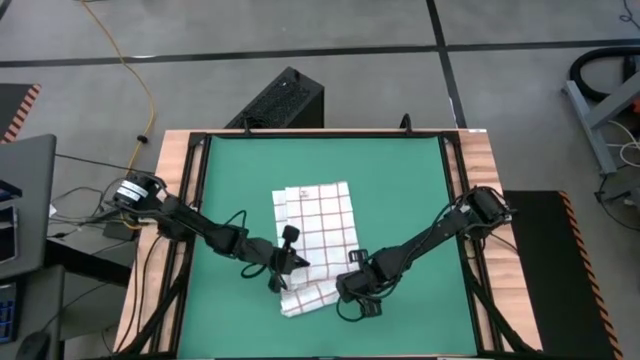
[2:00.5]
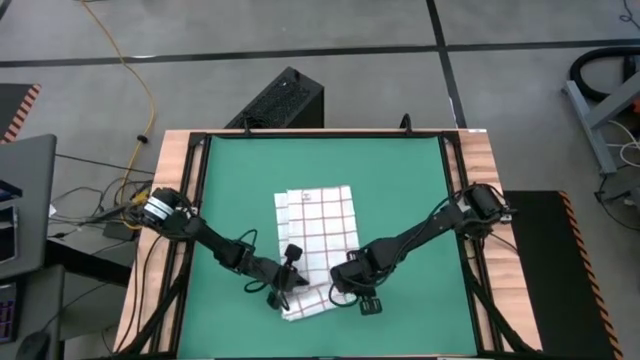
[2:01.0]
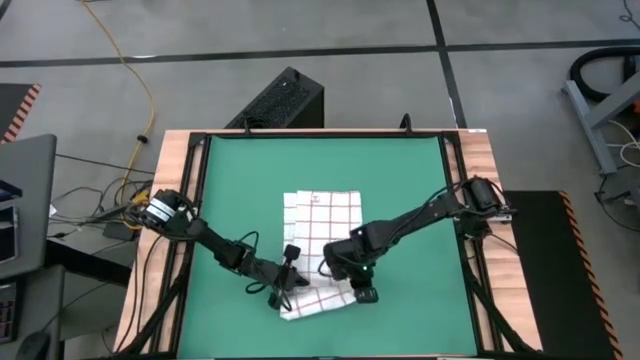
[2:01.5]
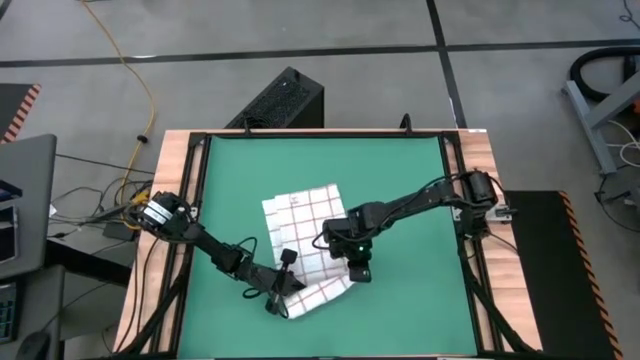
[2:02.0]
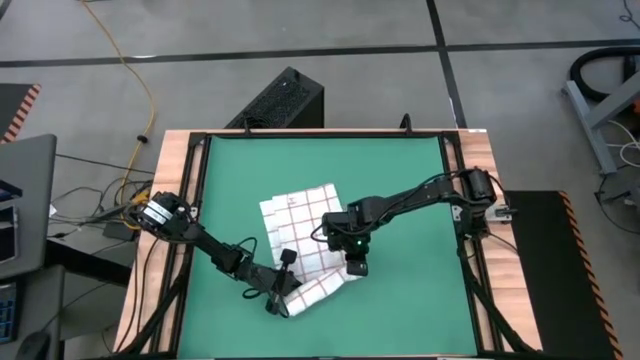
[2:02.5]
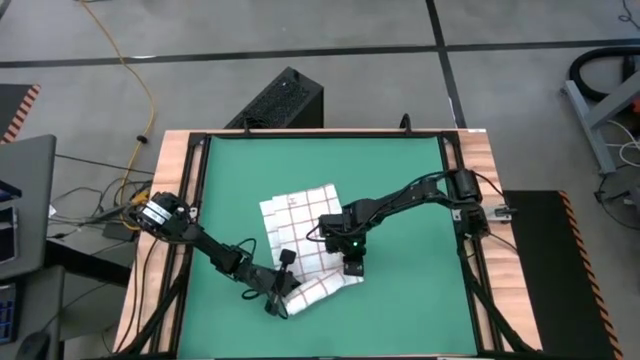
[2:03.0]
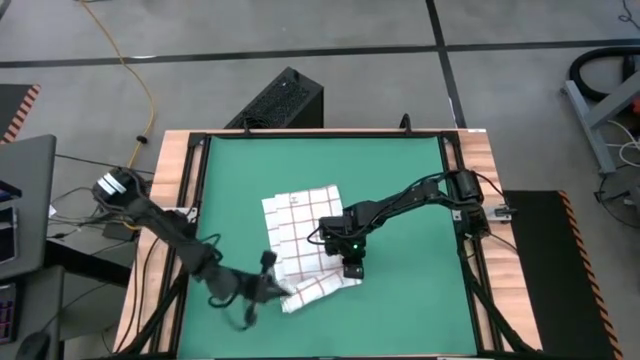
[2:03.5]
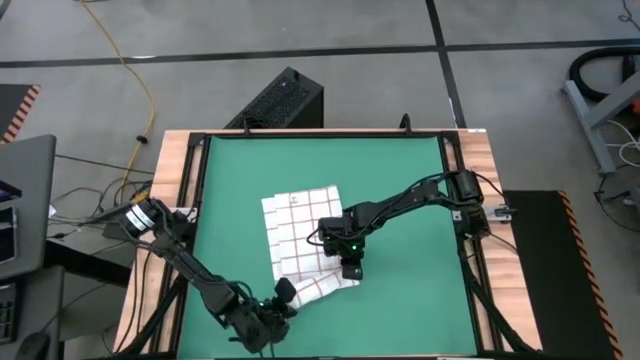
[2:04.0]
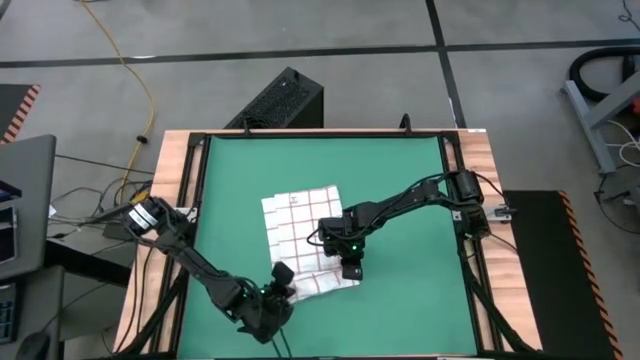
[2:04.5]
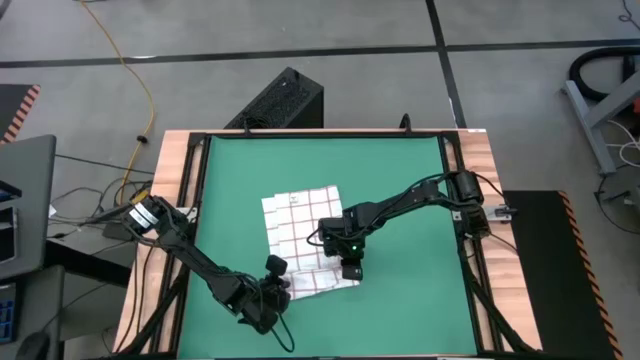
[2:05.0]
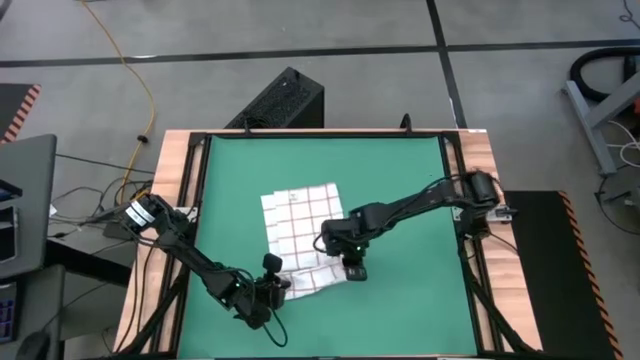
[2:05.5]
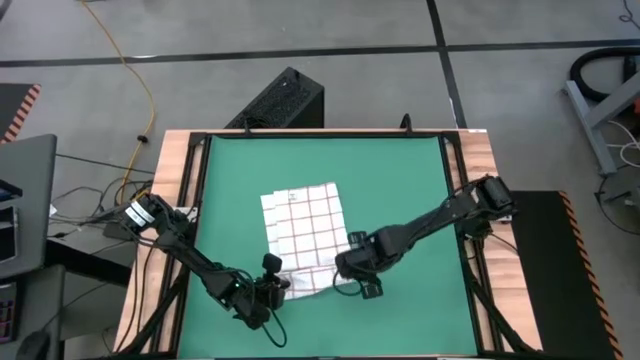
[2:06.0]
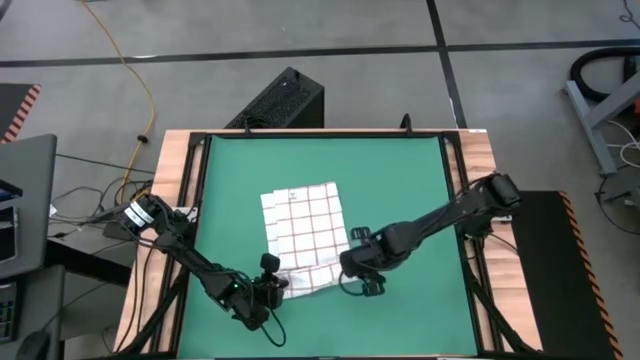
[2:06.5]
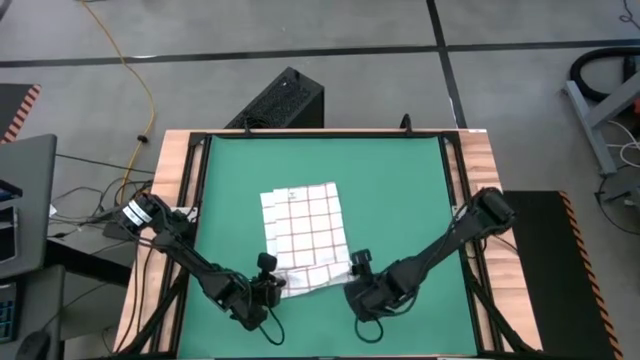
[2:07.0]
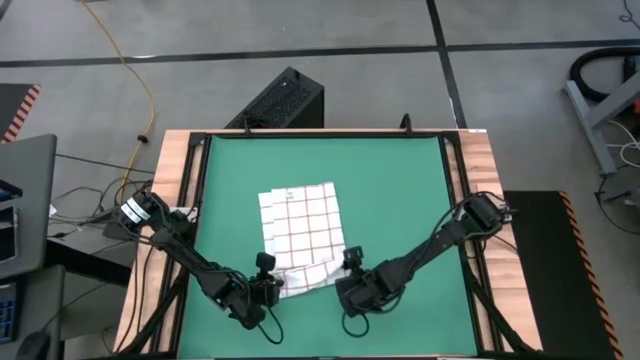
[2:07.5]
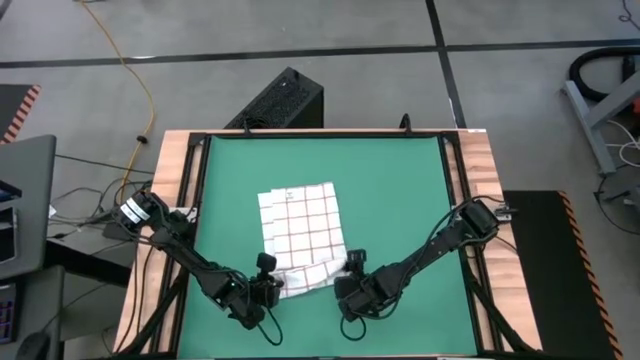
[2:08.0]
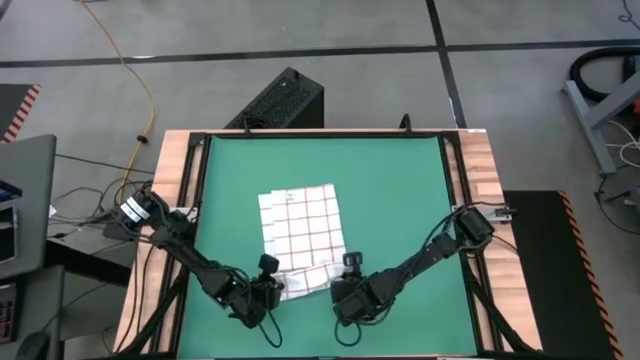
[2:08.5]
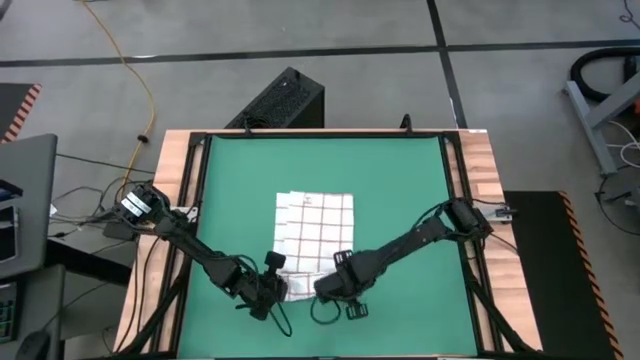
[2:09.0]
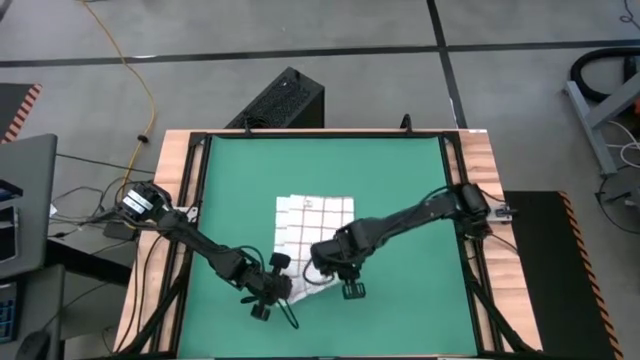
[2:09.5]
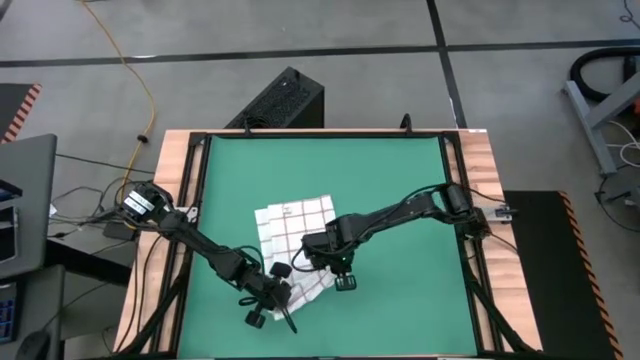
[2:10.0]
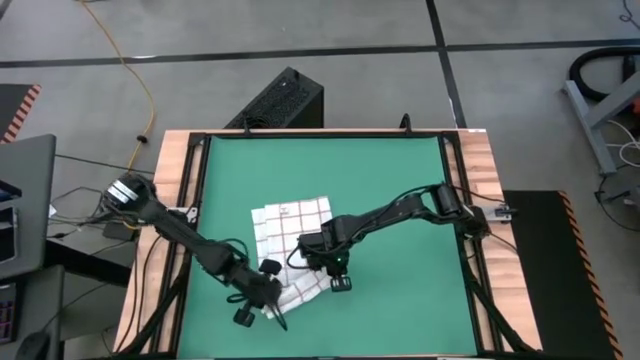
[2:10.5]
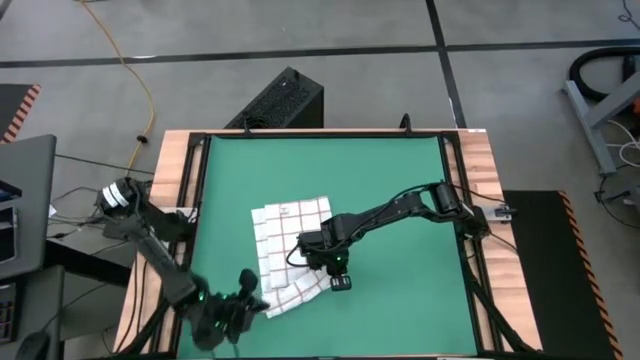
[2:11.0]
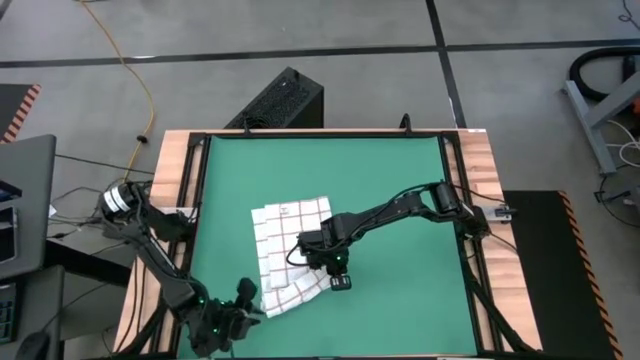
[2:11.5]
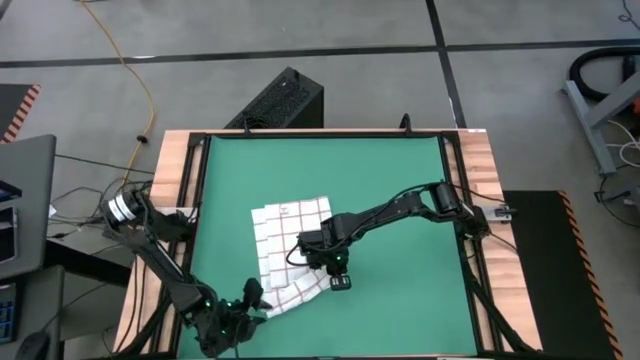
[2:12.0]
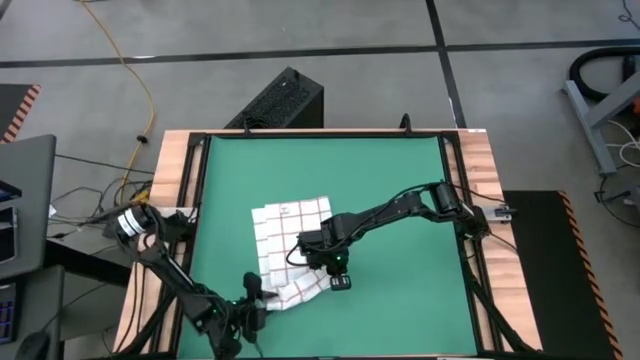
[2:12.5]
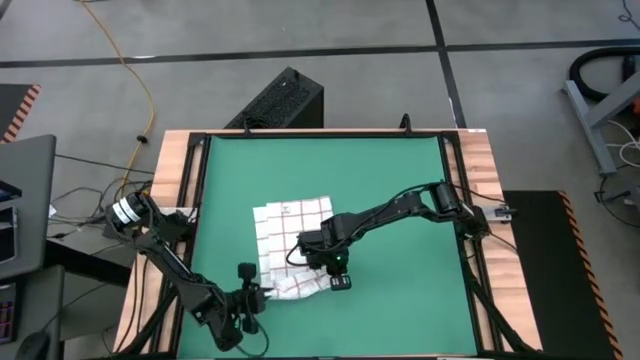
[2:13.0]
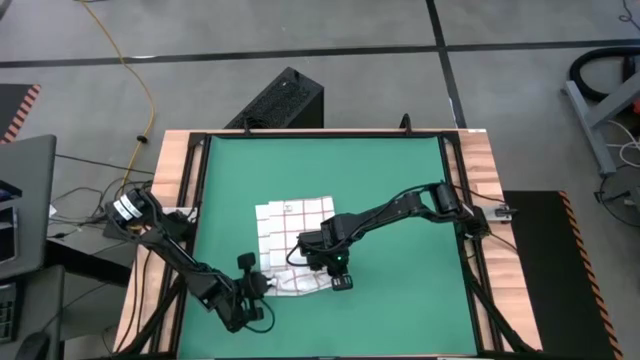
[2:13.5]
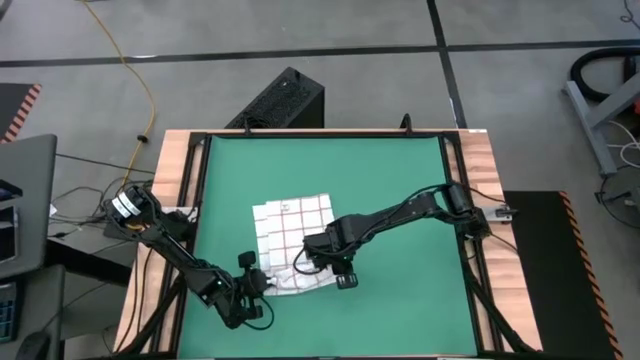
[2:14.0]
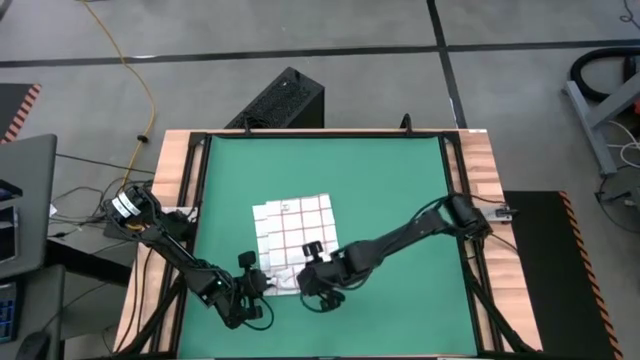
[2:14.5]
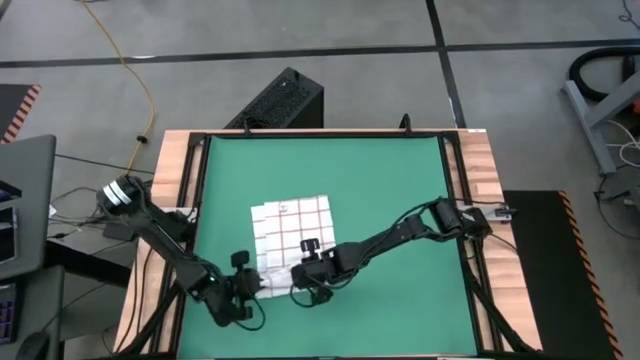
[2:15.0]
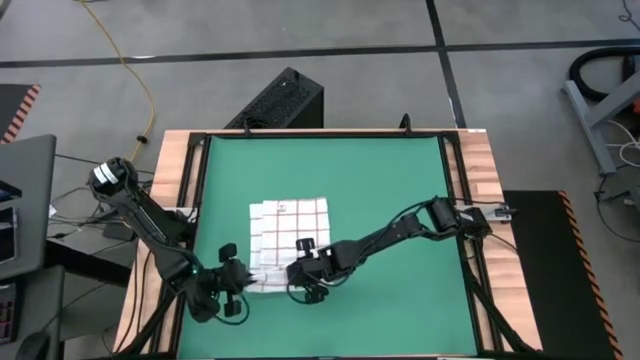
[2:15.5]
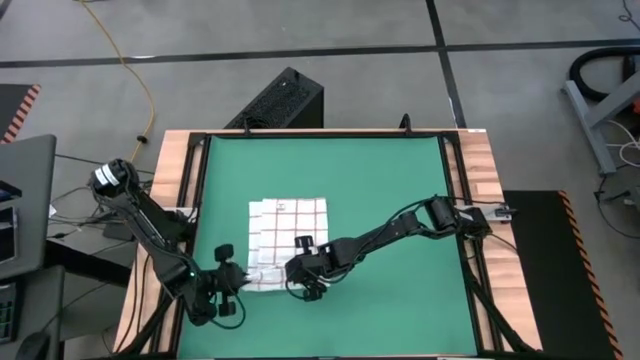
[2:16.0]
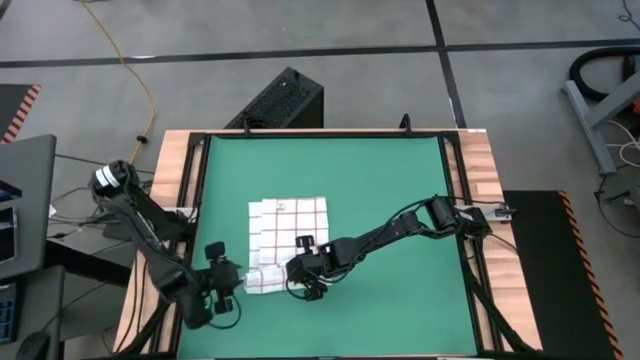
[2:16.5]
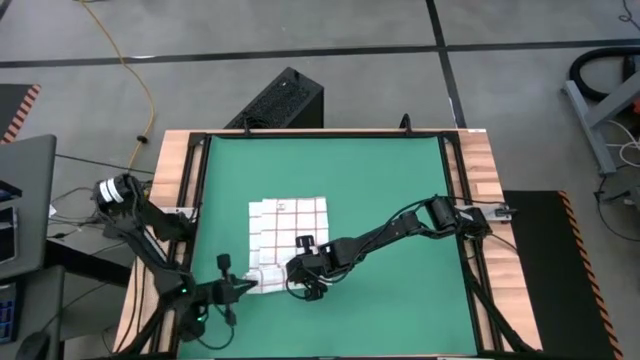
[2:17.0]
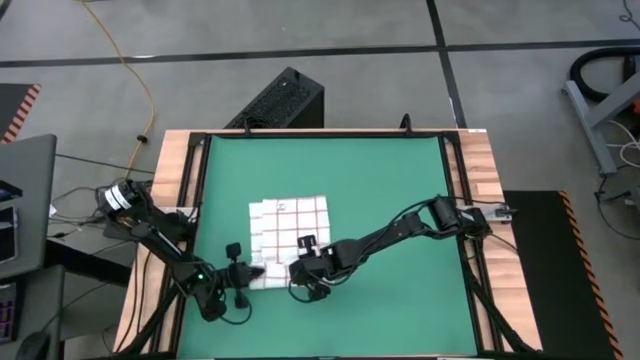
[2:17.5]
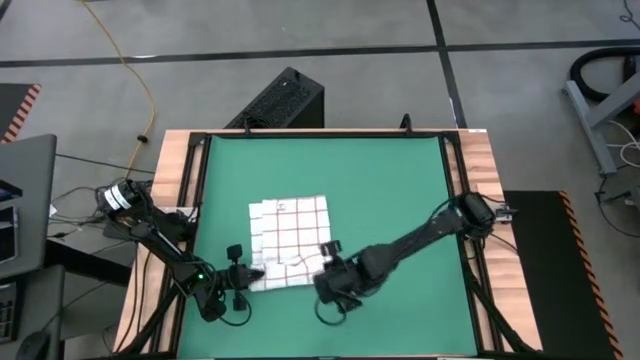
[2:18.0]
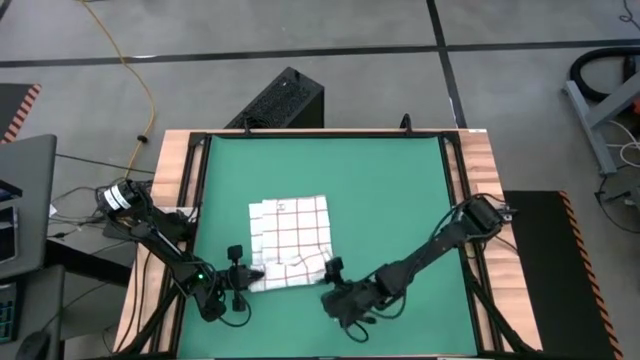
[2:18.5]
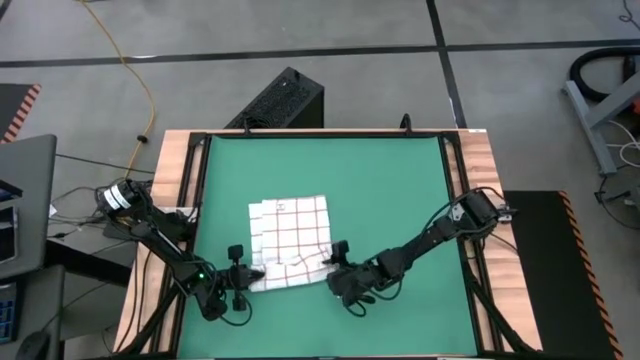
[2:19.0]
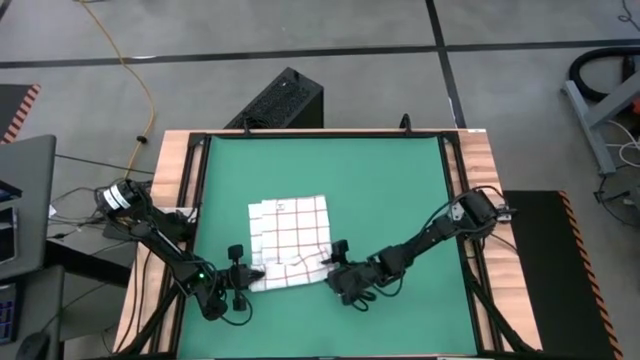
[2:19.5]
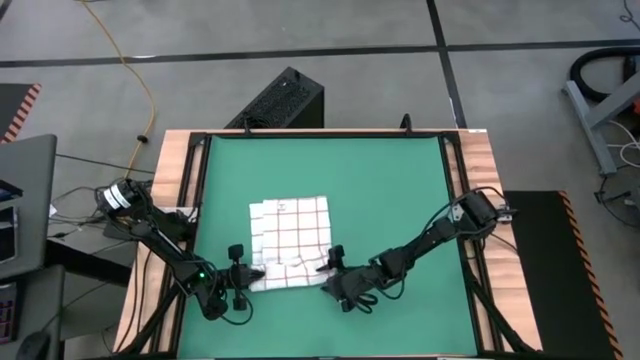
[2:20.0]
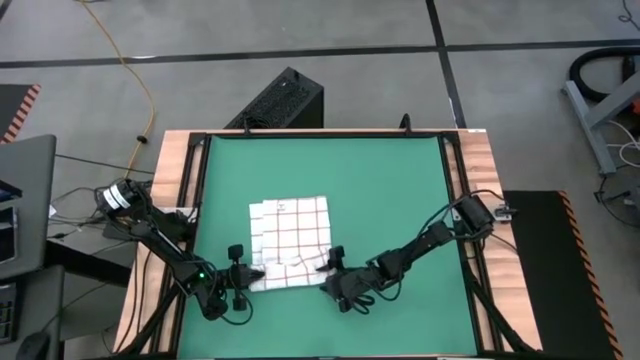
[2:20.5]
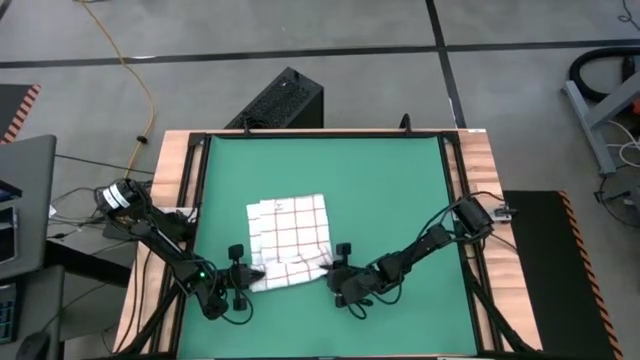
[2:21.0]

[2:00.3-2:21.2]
Task: Roll towel
Roll the white towel
